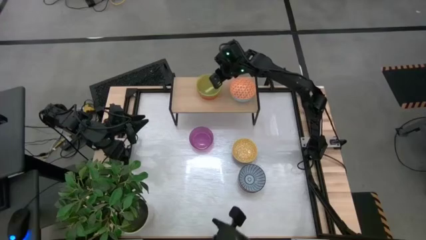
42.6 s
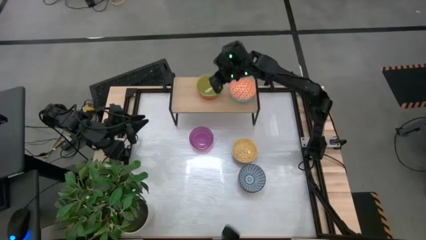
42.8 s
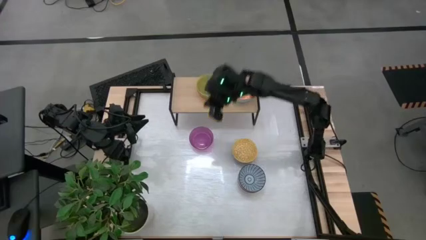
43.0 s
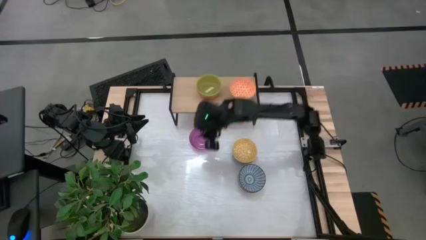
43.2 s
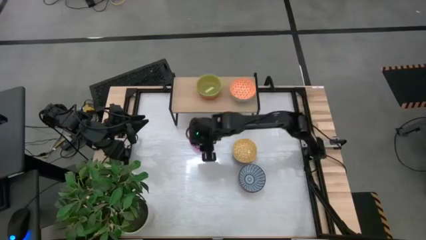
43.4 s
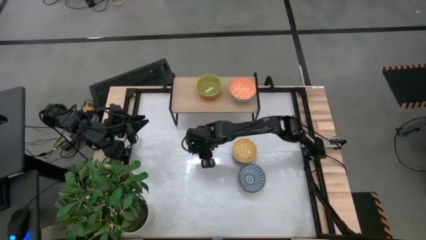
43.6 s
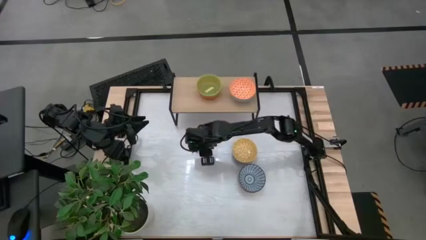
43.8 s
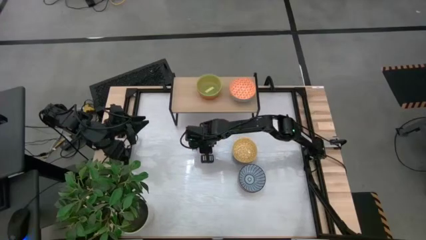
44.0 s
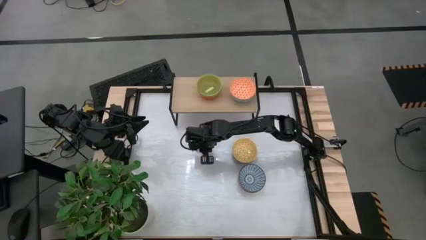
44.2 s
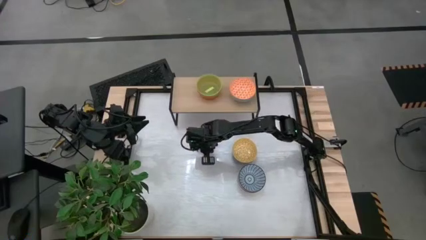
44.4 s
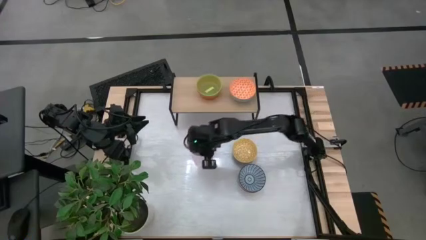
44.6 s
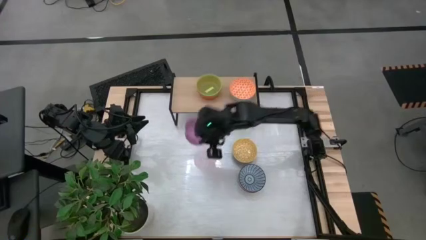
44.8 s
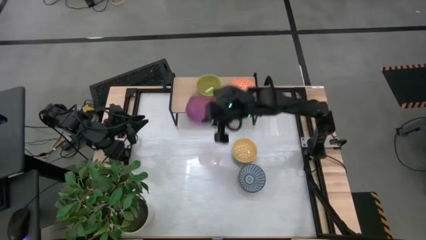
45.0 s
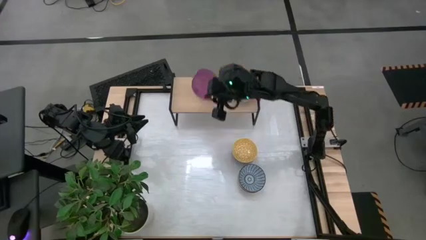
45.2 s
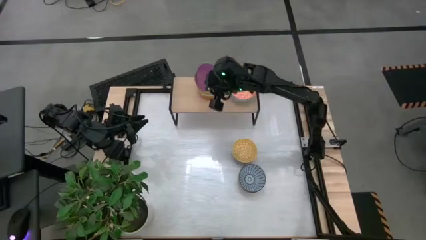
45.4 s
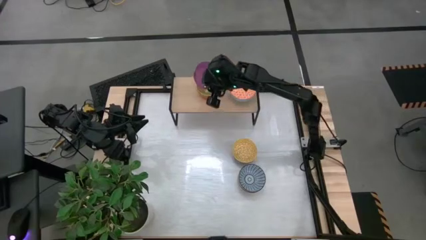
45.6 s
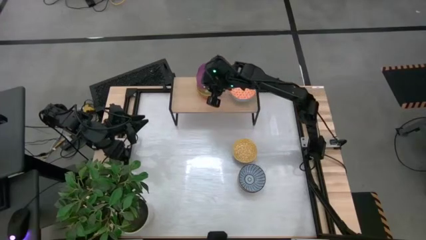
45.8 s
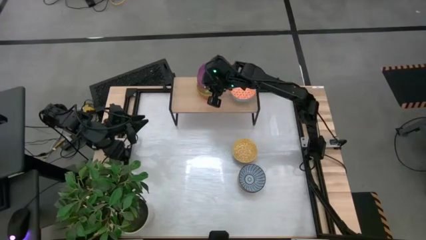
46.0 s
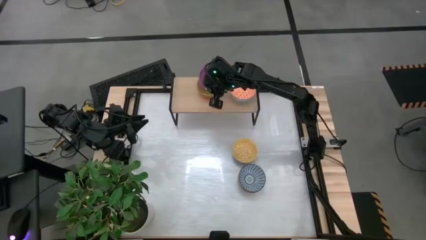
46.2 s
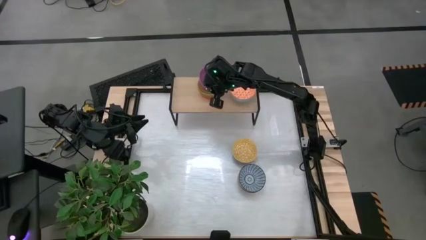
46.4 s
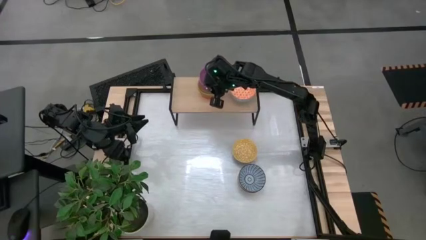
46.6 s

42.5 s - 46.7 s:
Task: Place and stack bowls onto a shelf
Stack the violet bowl on top of the yellow bowl on the shelf

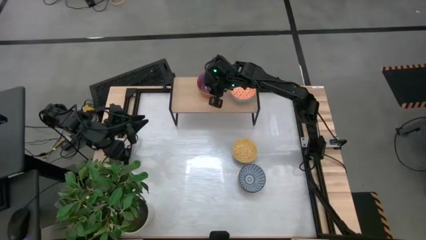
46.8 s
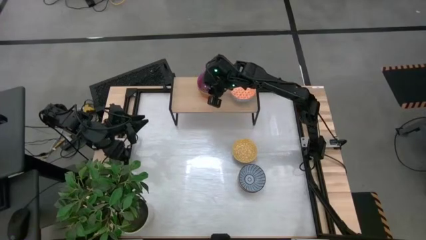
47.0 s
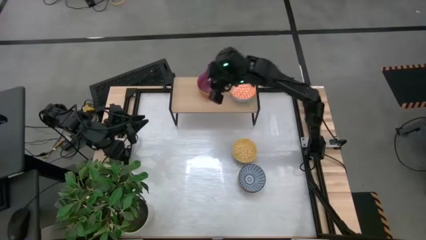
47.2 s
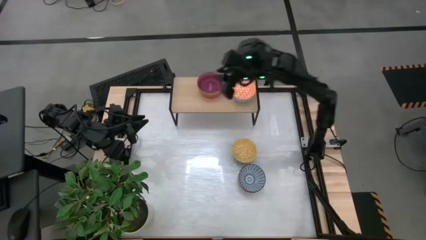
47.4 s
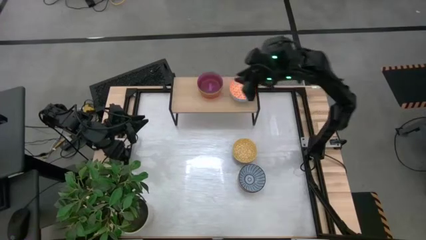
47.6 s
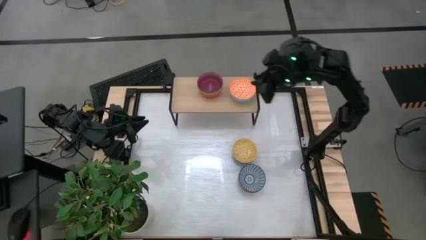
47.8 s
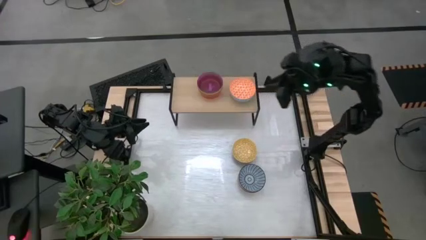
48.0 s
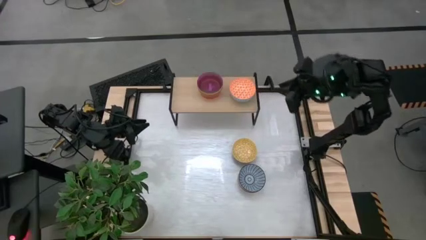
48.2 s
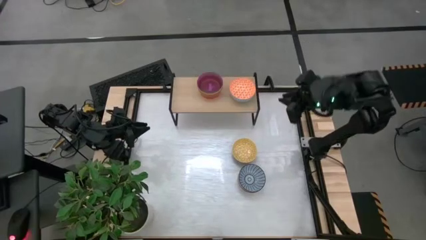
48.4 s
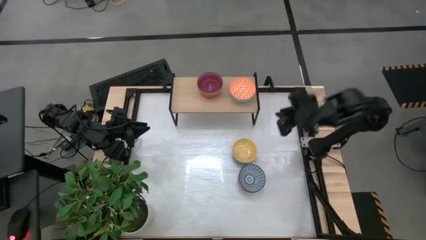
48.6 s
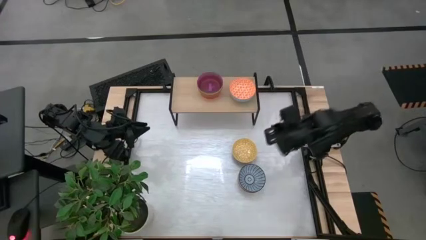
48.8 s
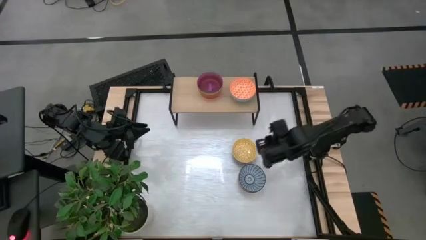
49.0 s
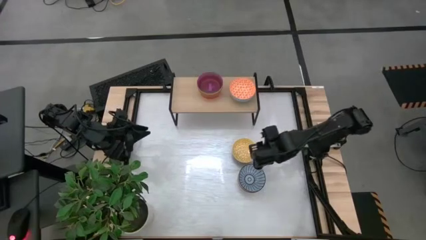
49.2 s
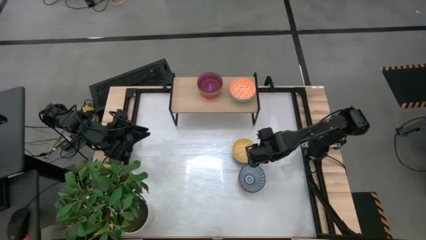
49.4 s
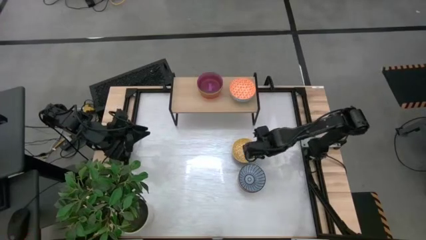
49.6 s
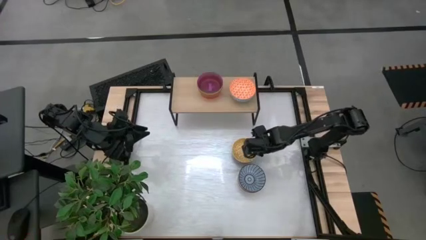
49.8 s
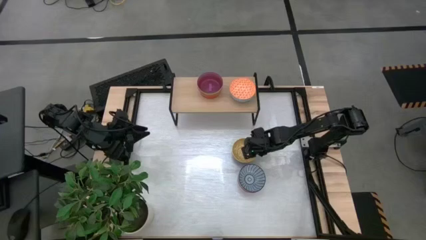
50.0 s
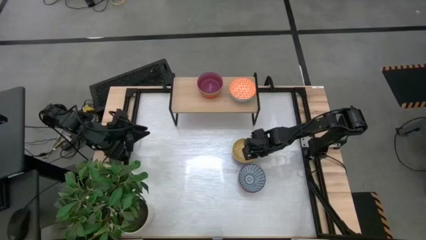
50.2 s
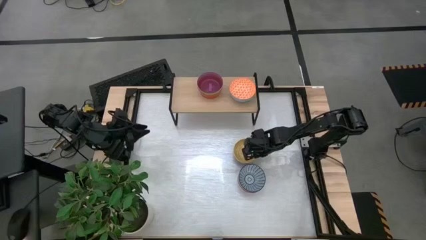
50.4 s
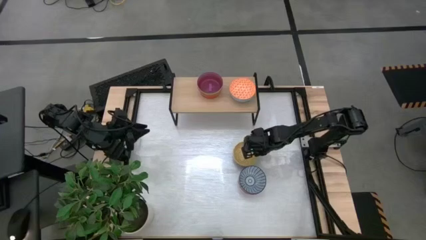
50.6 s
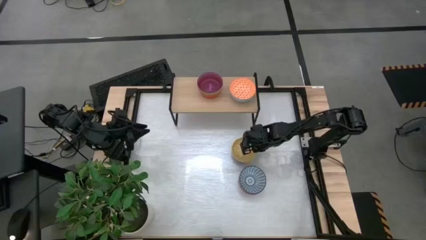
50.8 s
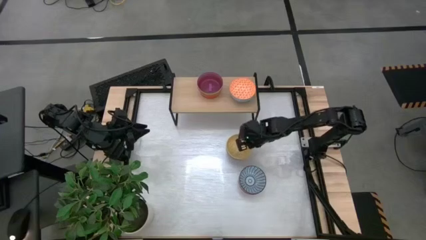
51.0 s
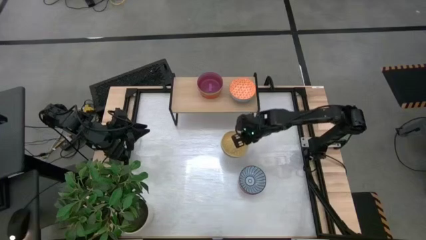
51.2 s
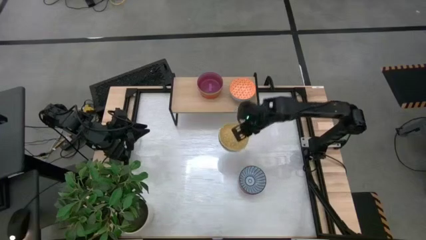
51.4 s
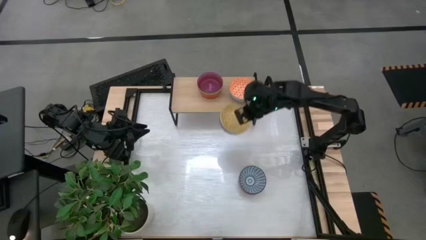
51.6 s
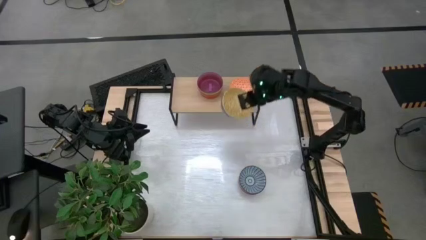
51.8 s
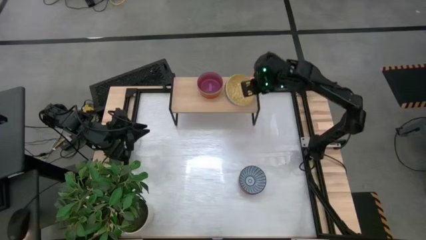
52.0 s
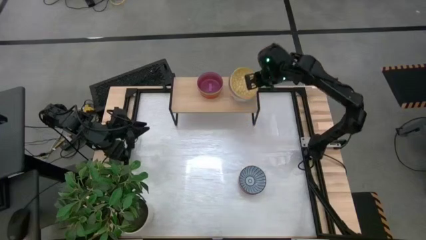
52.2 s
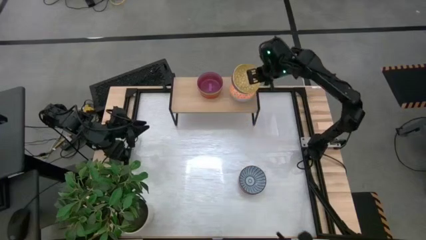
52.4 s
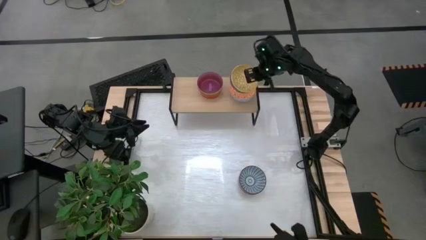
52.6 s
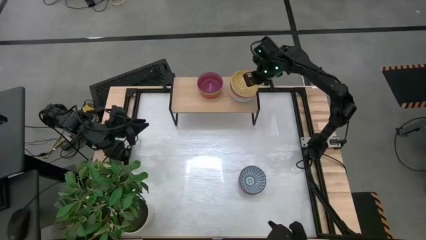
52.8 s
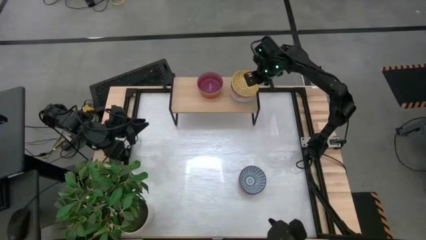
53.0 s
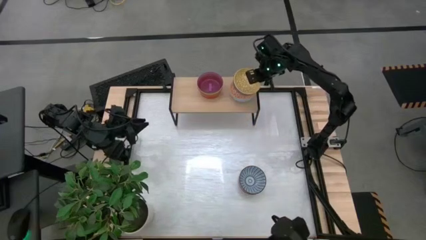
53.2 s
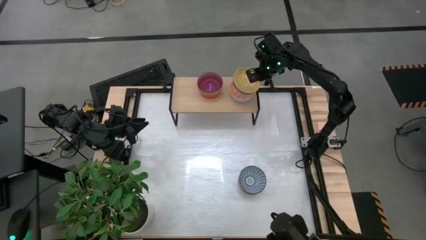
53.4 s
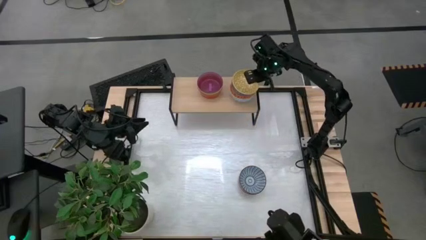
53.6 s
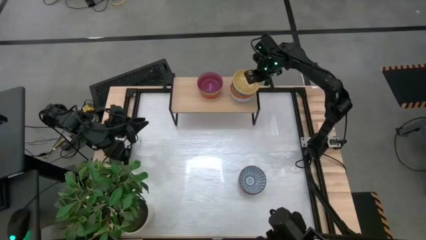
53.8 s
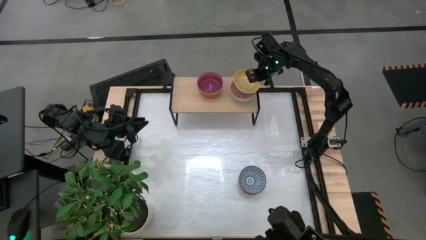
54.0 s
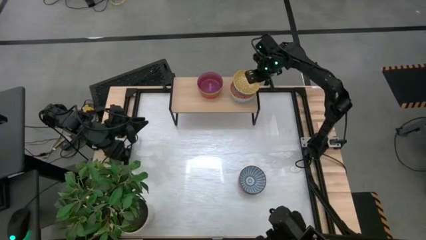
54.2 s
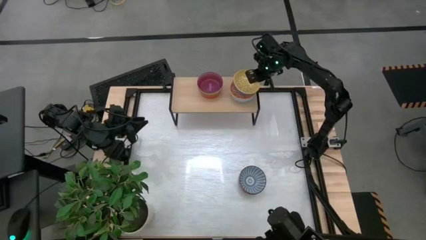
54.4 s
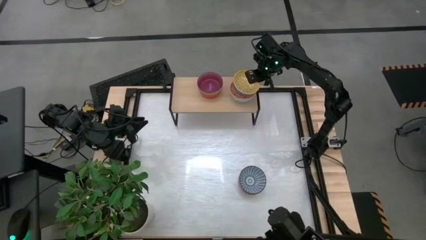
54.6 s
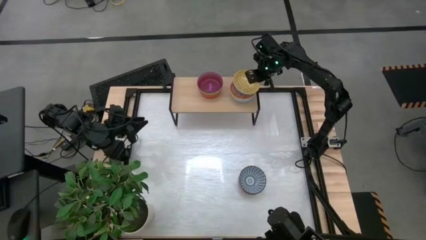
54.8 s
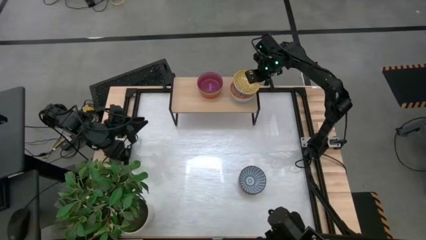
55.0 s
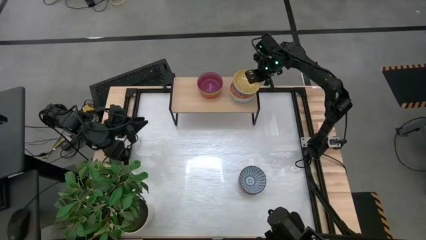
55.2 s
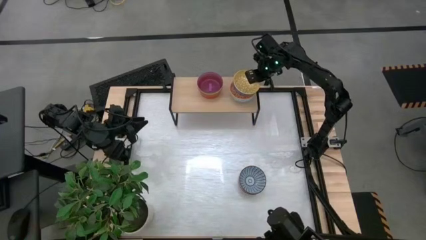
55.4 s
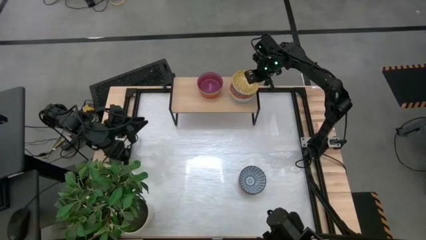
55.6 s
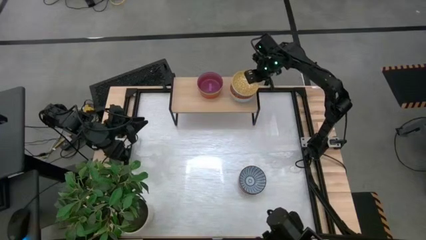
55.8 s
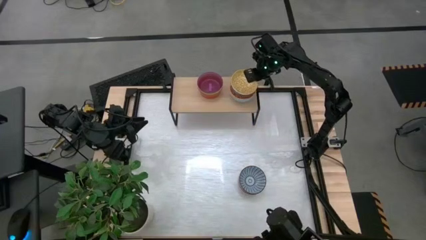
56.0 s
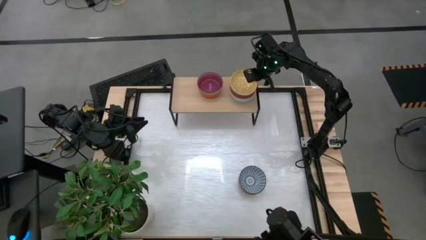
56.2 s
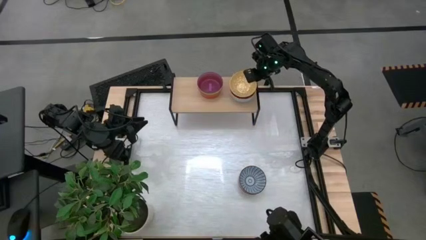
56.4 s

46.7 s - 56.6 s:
Stack the yellow patterned bowl on top of the light orange patterned bowl on the shelf
